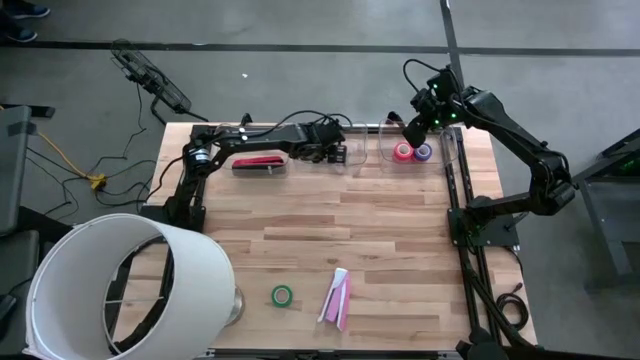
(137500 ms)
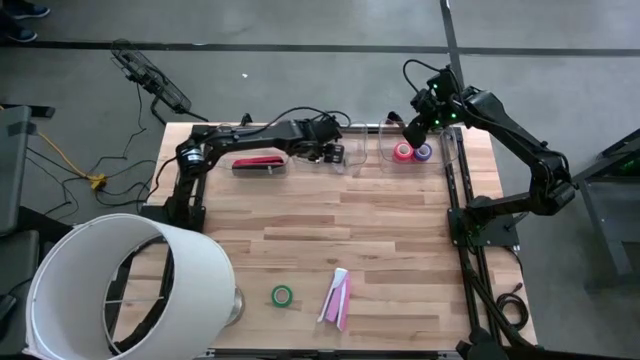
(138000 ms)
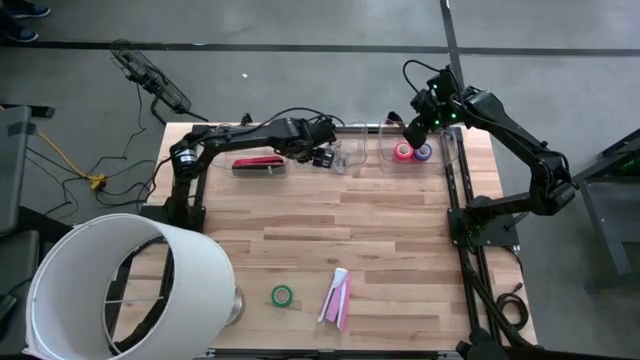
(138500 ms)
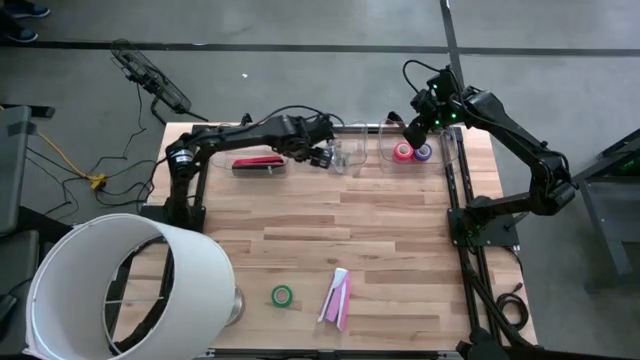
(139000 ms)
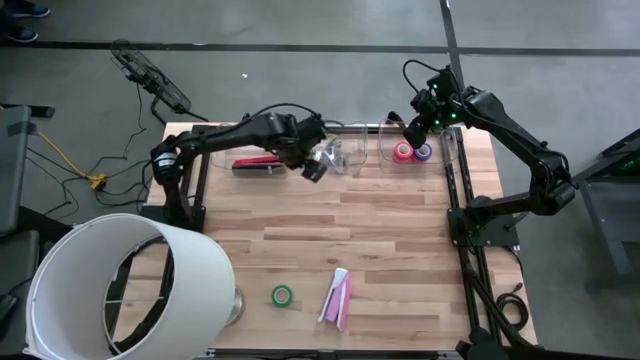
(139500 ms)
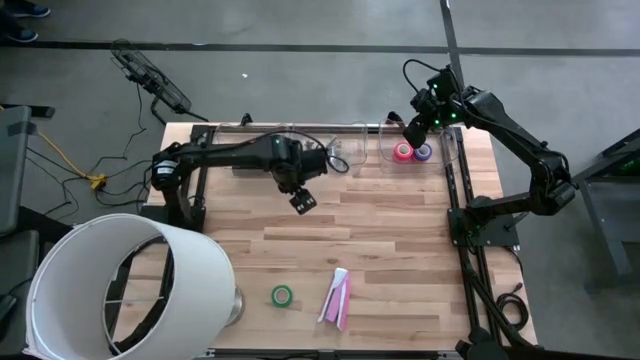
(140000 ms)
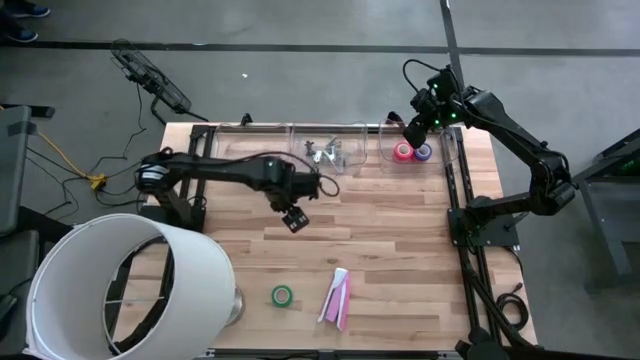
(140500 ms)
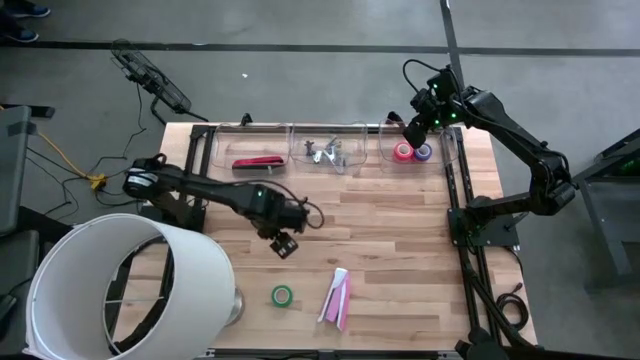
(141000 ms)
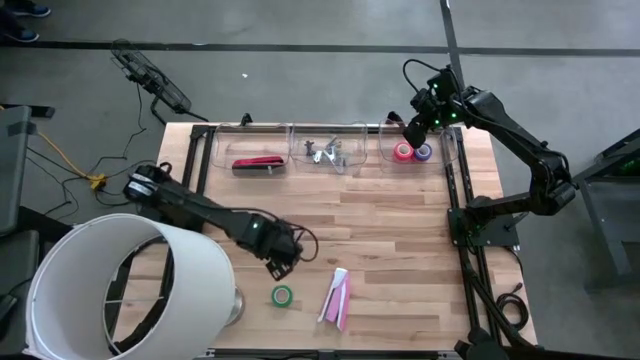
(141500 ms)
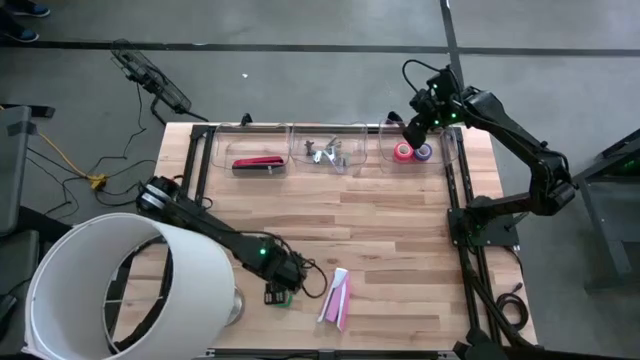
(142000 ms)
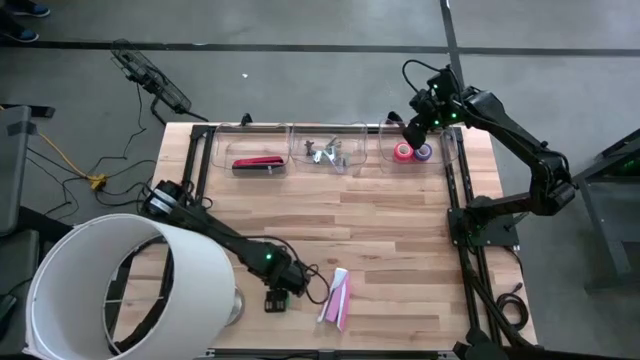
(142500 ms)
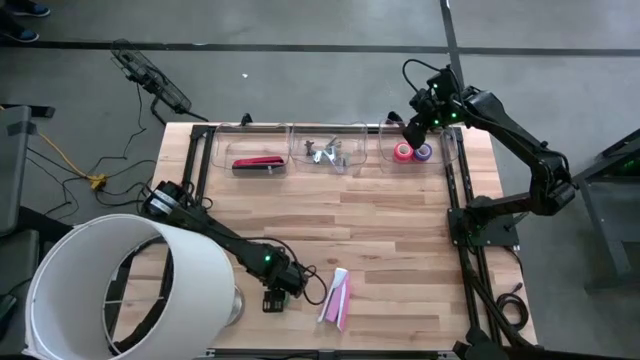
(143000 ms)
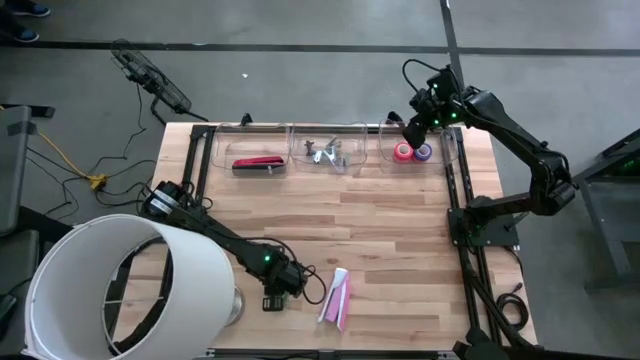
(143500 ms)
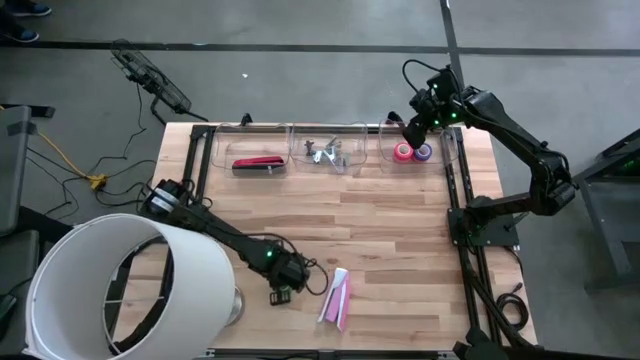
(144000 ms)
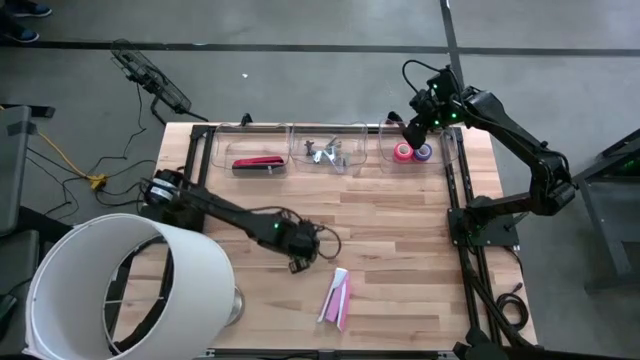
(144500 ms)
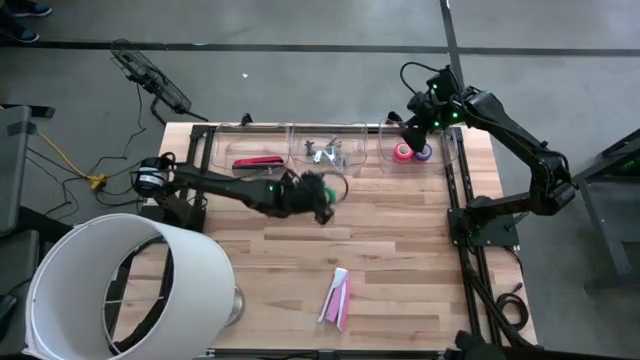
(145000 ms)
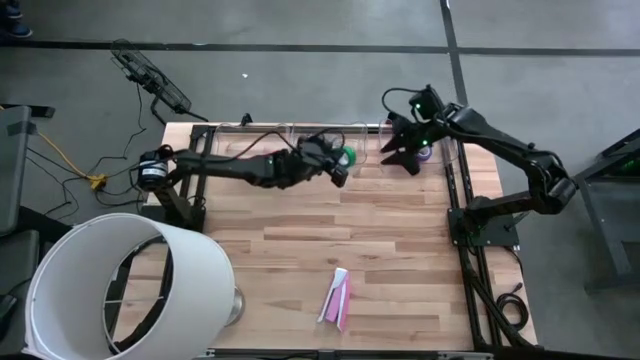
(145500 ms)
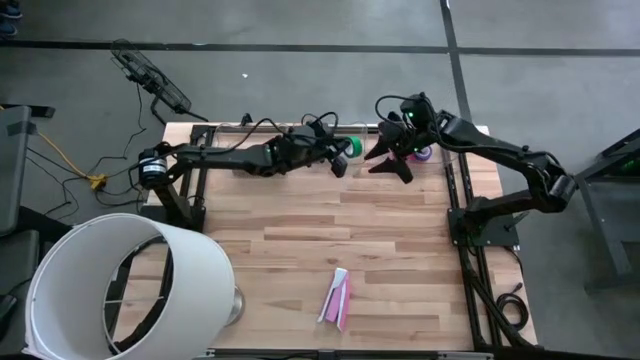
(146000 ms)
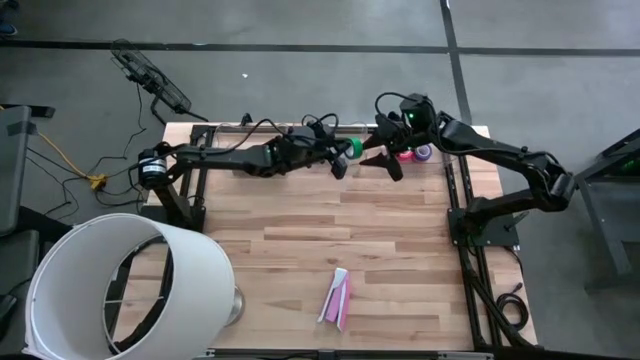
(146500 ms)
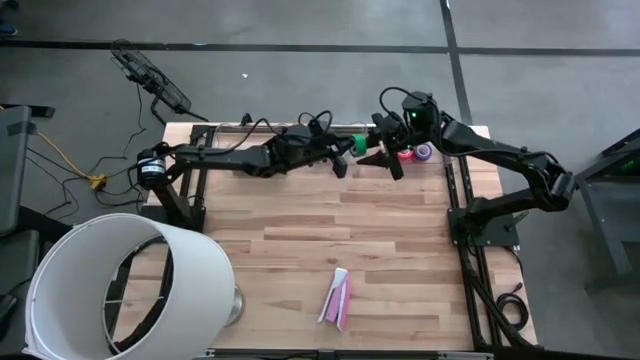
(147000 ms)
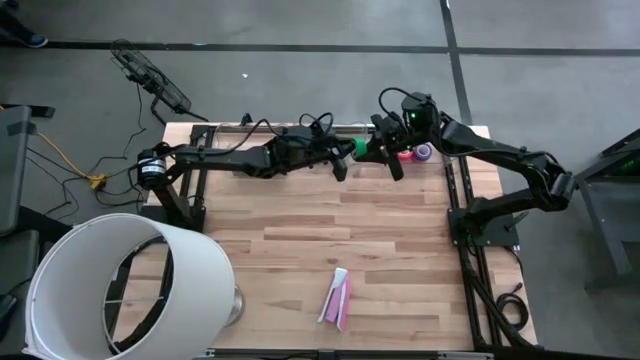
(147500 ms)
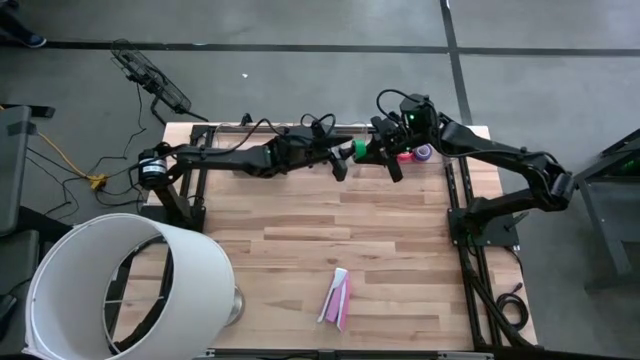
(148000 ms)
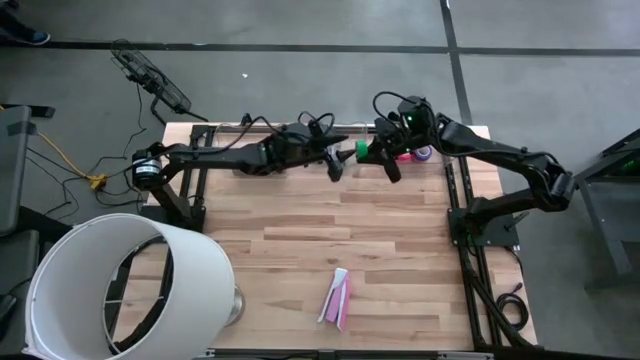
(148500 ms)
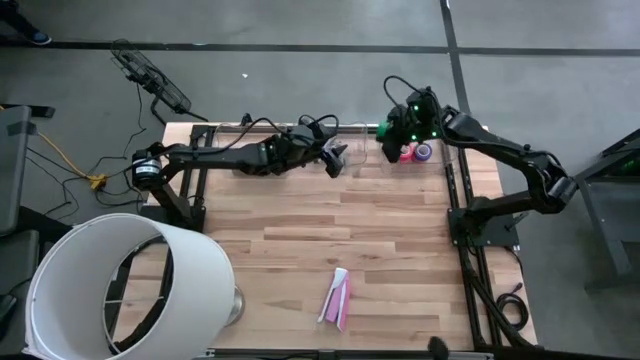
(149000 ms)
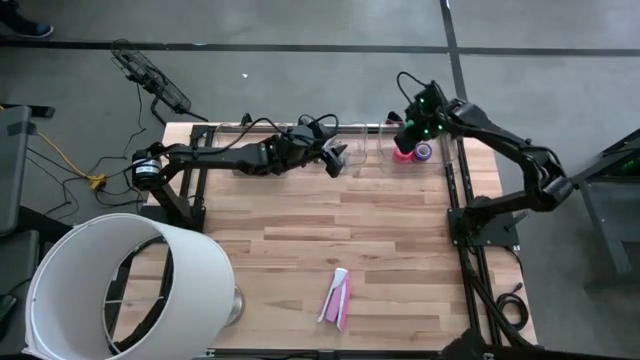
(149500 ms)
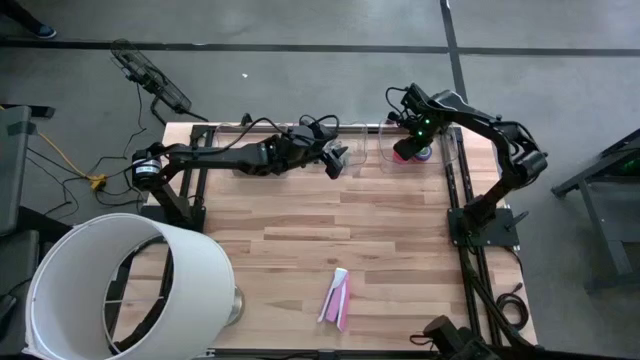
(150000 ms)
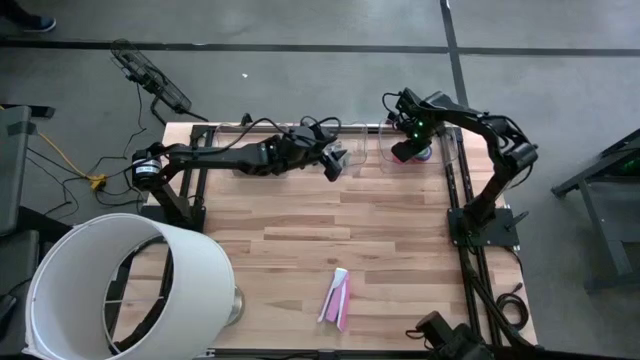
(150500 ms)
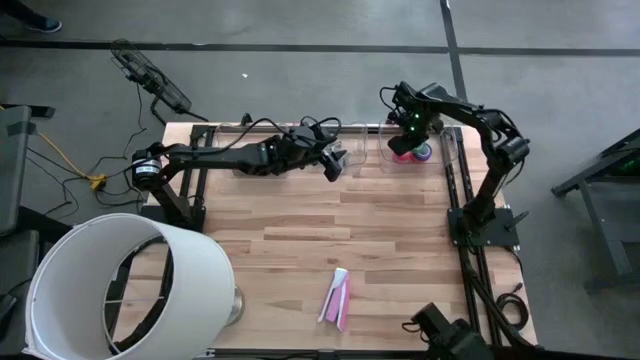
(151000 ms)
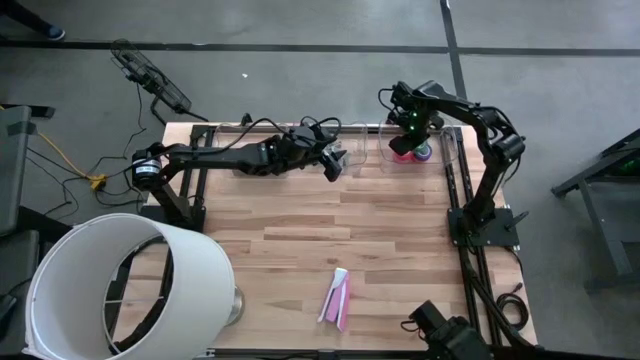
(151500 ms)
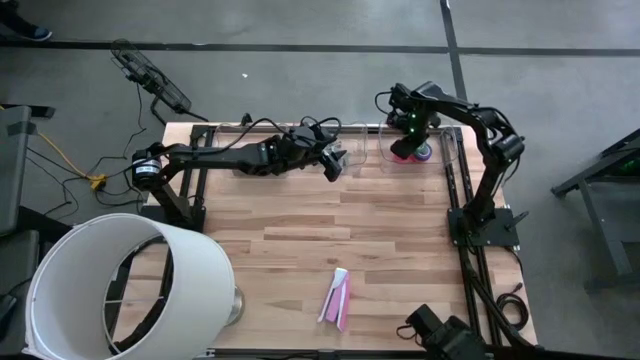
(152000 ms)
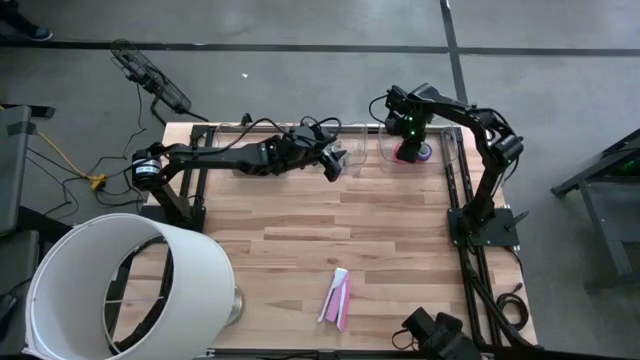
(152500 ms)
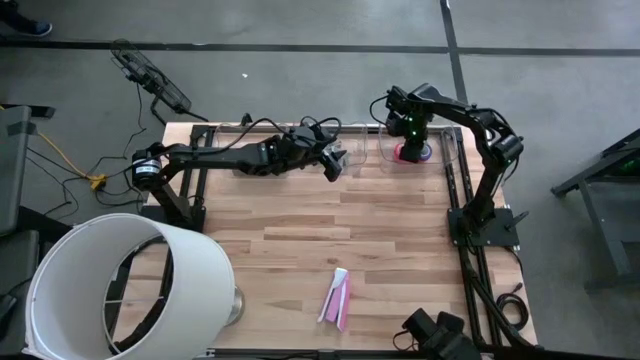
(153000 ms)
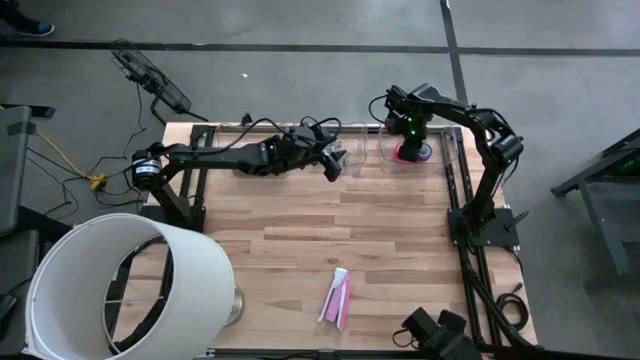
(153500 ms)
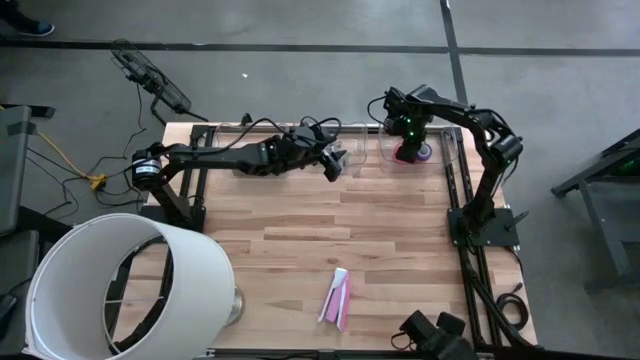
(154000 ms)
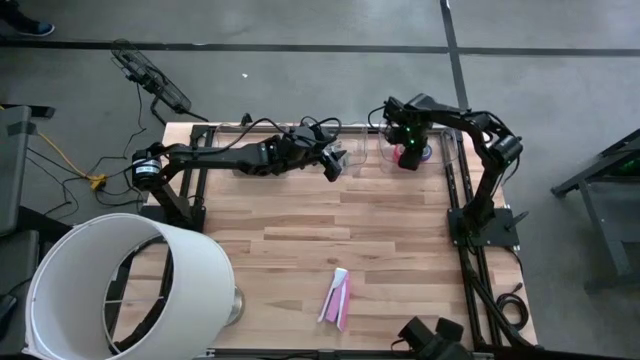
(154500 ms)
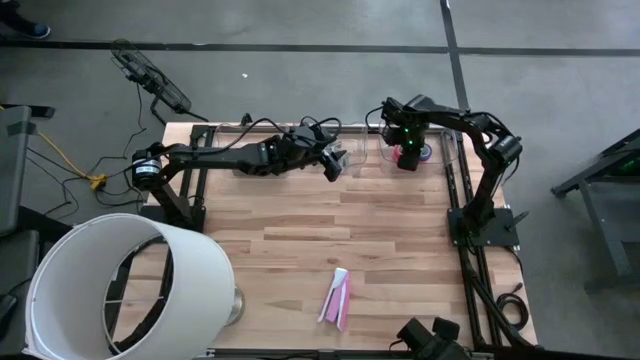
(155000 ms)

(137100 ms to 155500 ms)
Task: Pick and place Stapler, Stapler remover, tape
Put the green tape into the right transparent bin

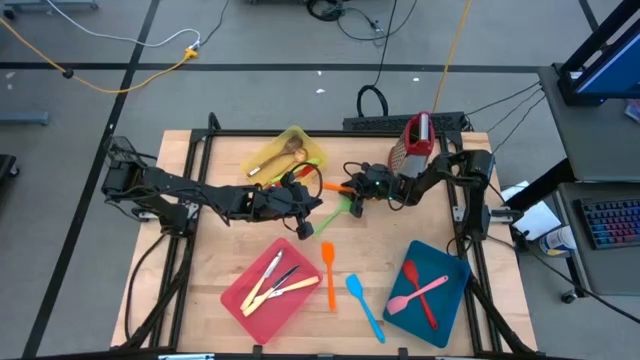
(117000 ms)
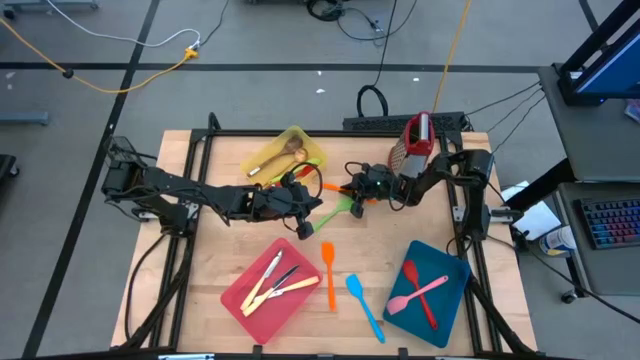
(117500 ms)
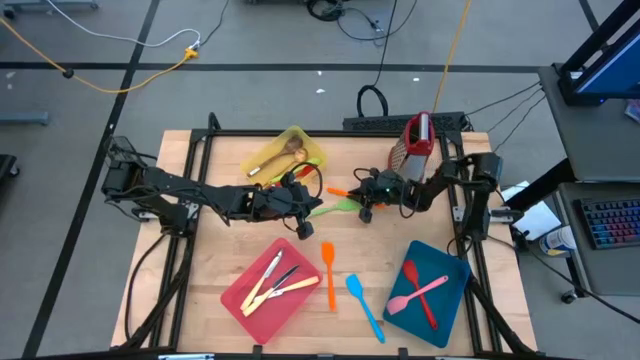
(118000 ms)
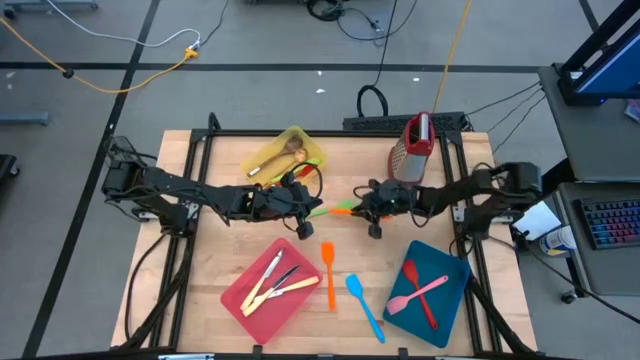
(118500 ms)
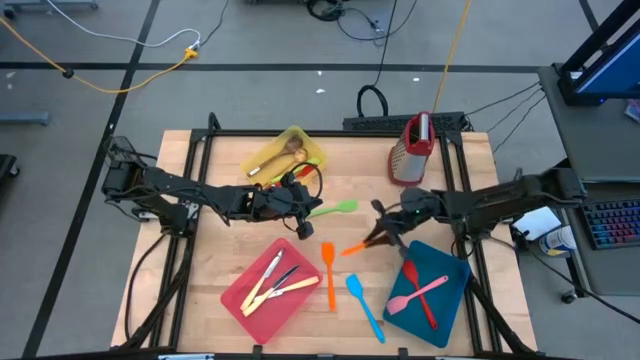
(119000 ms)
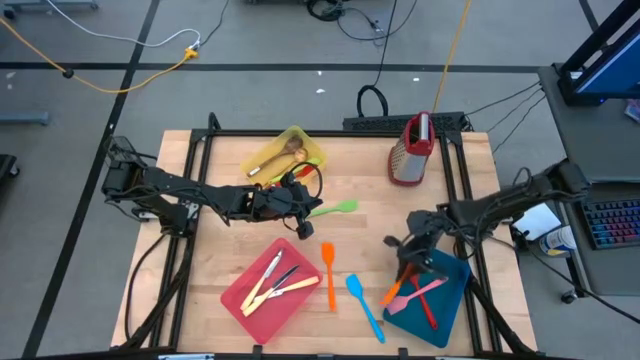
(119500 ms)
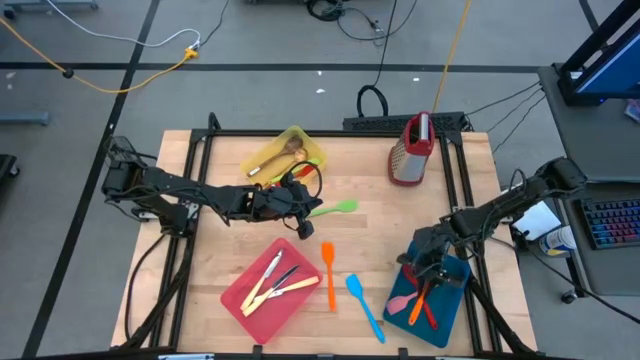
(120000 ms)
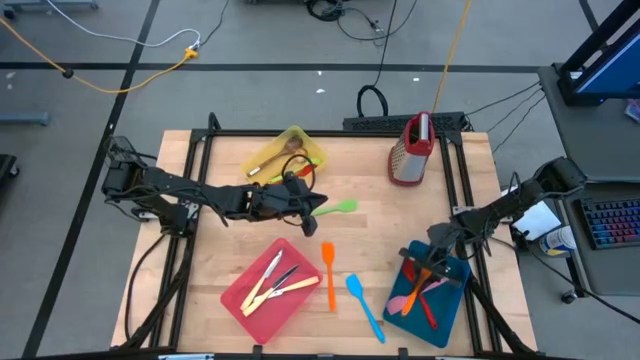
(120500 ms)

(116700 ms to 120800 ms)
Task: Pick & Place Kitchen Items
Put the orange spatula into the blue bin
